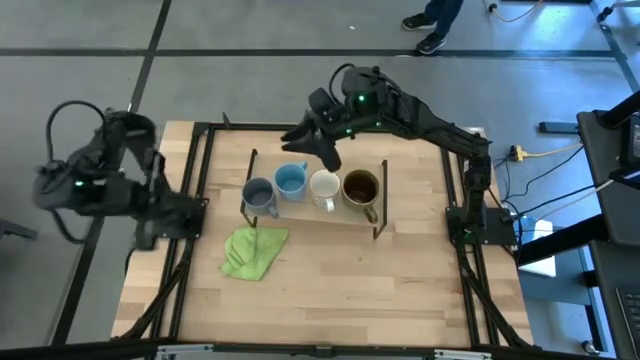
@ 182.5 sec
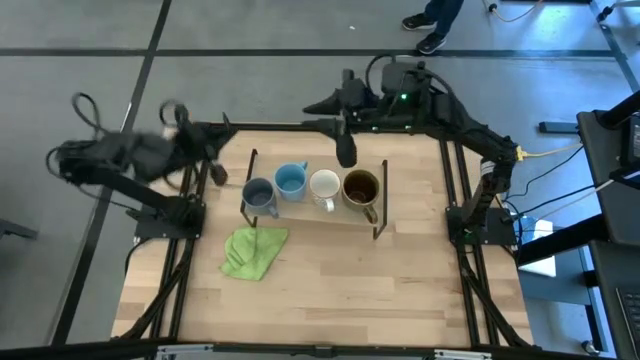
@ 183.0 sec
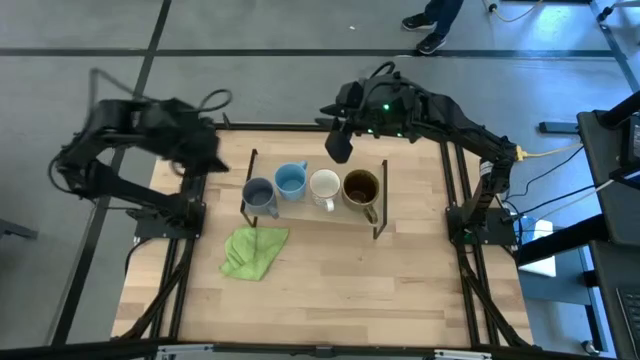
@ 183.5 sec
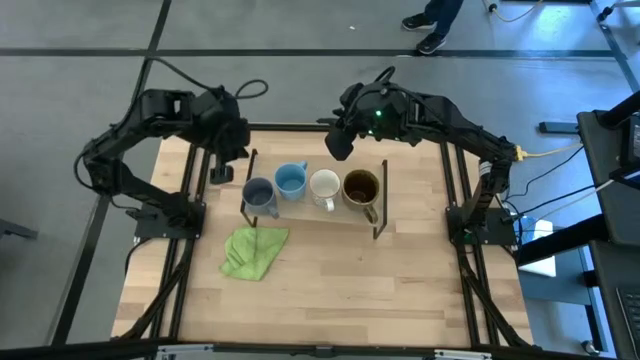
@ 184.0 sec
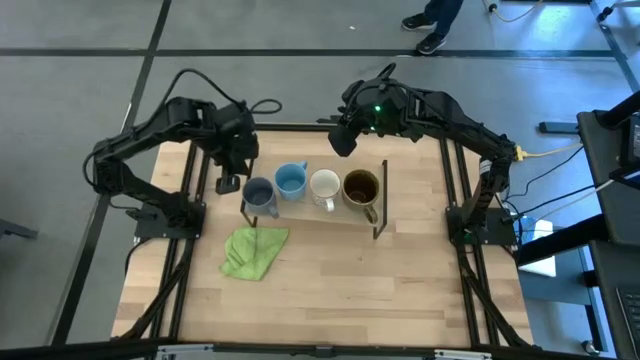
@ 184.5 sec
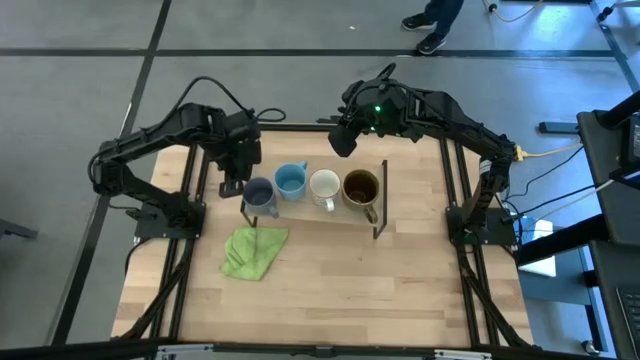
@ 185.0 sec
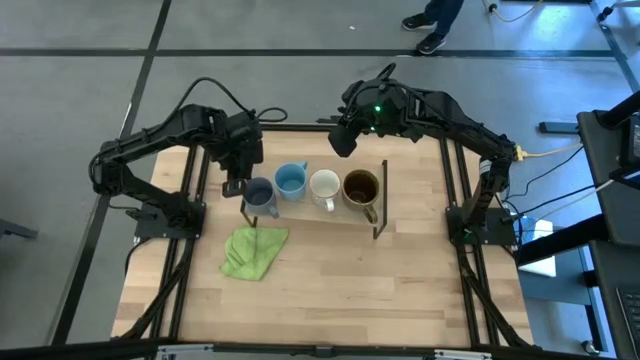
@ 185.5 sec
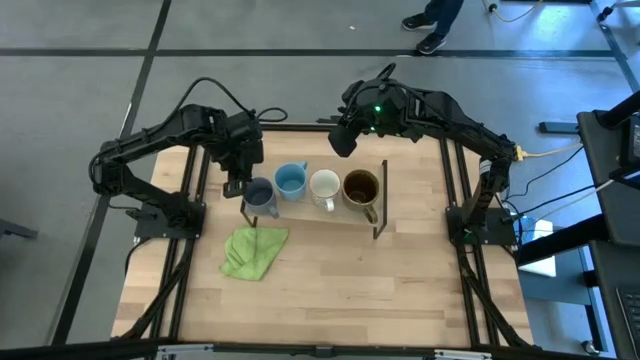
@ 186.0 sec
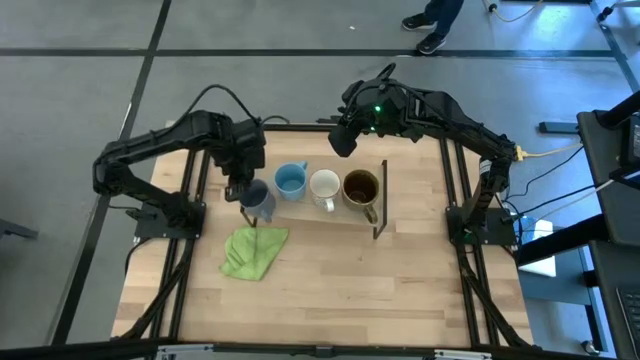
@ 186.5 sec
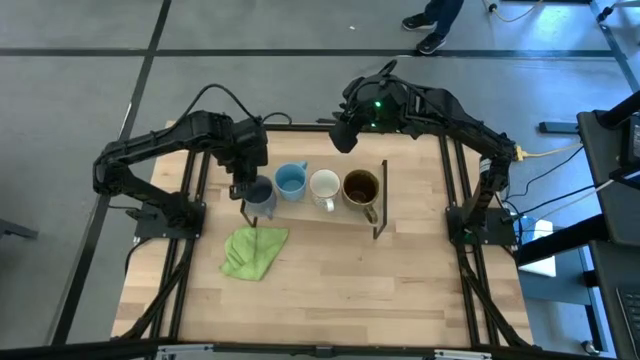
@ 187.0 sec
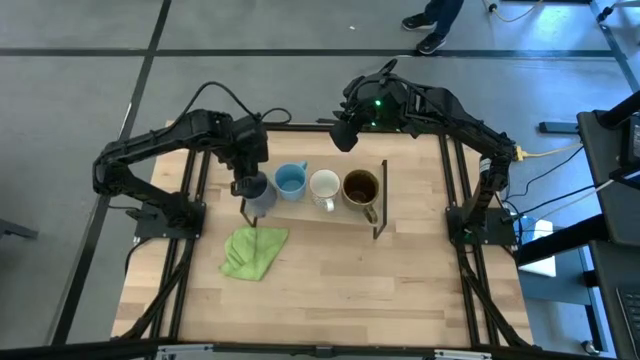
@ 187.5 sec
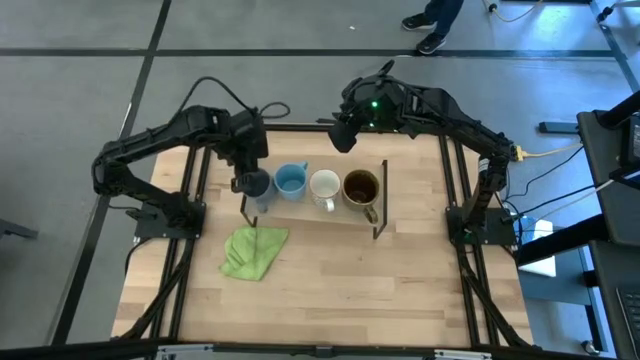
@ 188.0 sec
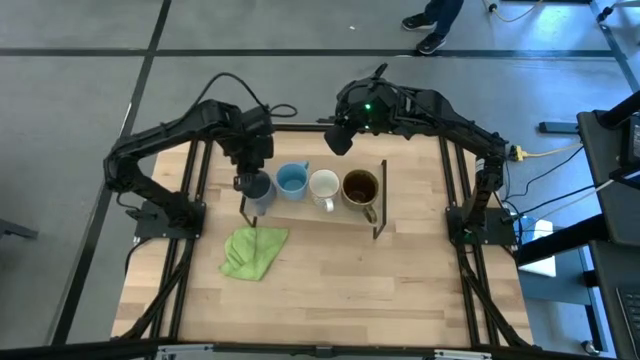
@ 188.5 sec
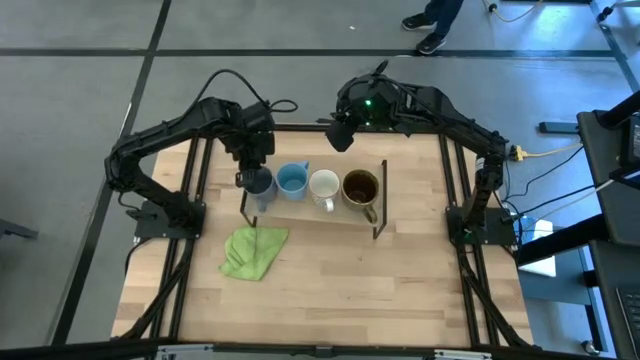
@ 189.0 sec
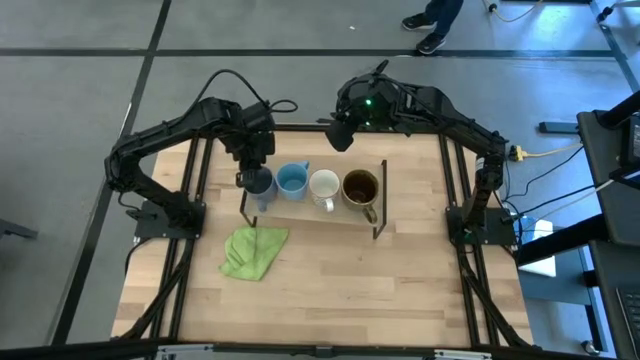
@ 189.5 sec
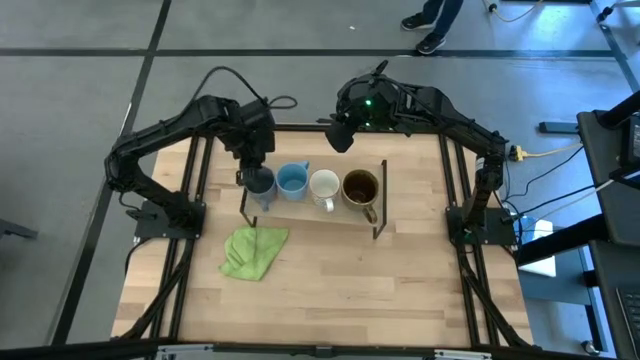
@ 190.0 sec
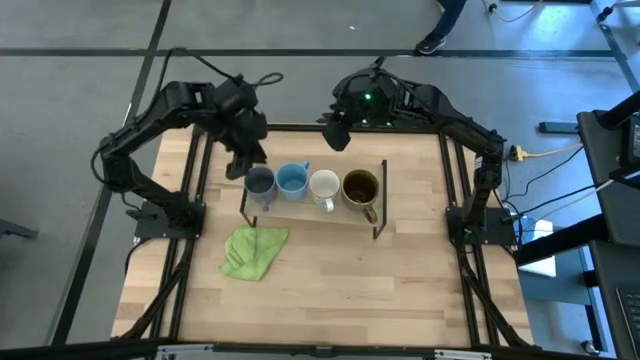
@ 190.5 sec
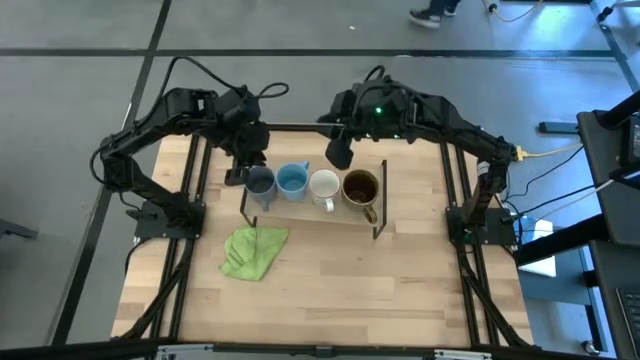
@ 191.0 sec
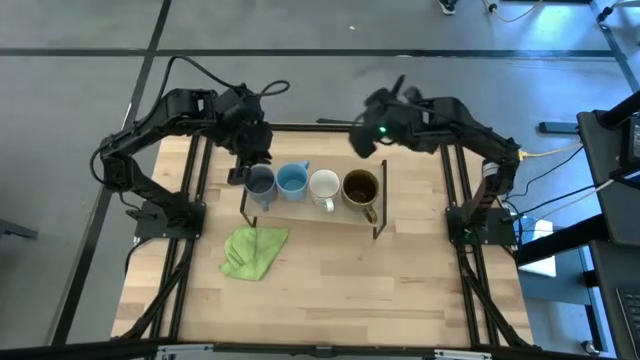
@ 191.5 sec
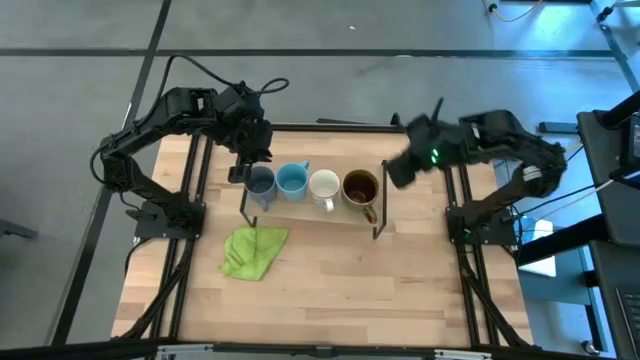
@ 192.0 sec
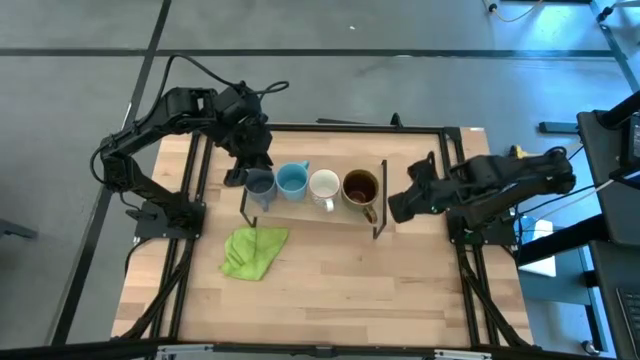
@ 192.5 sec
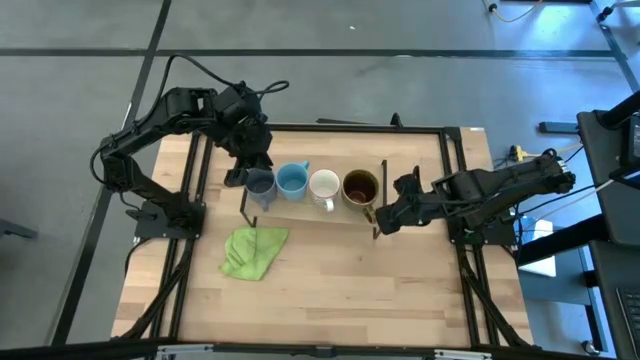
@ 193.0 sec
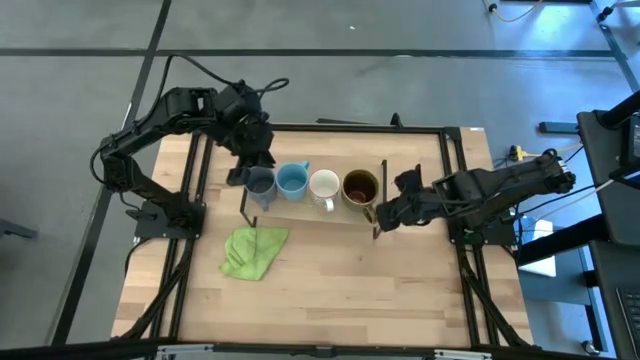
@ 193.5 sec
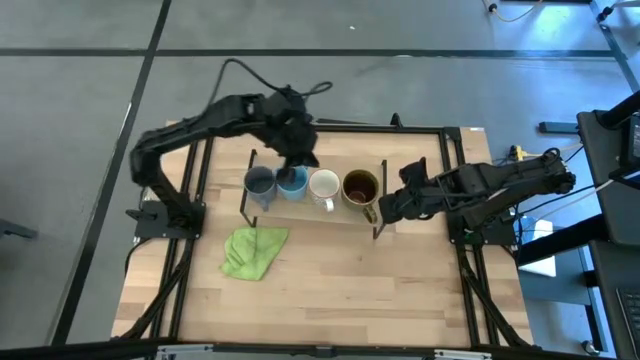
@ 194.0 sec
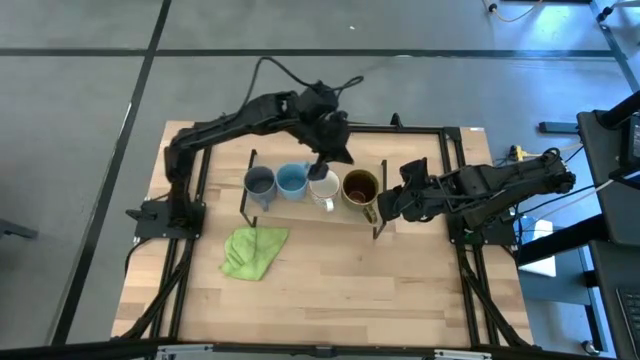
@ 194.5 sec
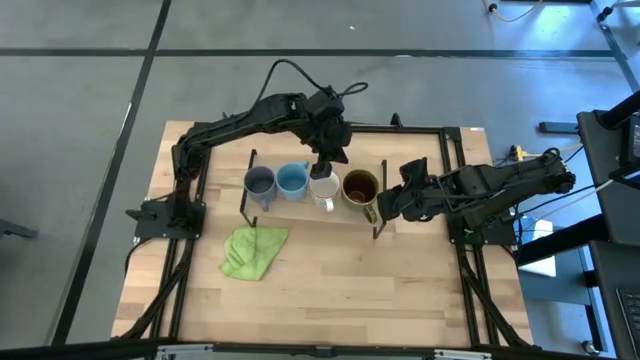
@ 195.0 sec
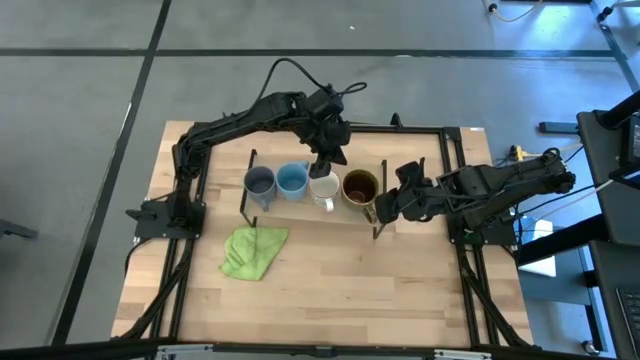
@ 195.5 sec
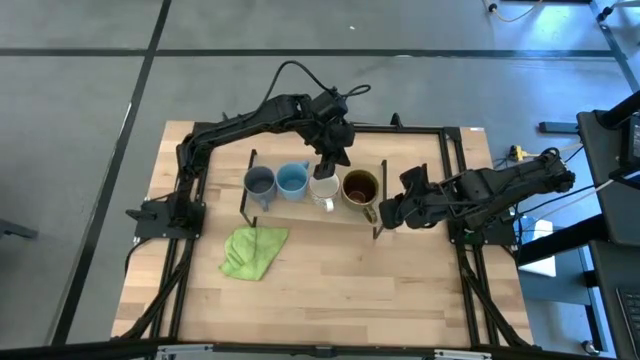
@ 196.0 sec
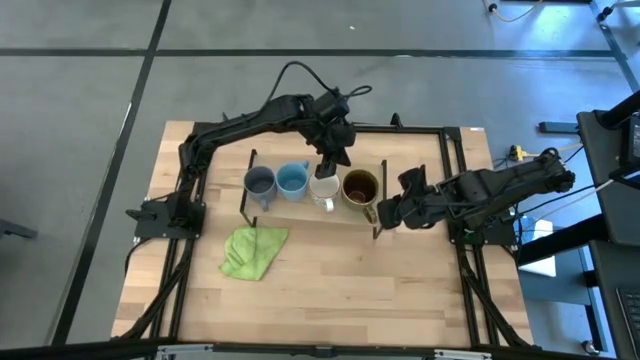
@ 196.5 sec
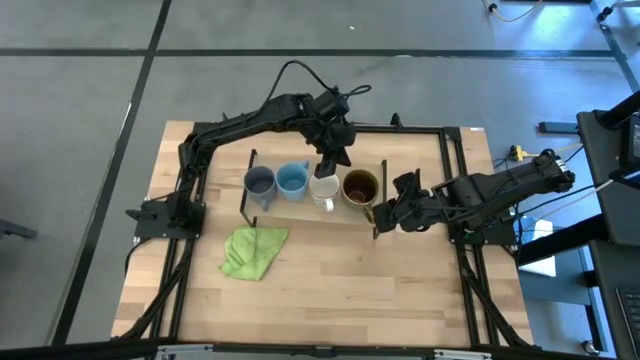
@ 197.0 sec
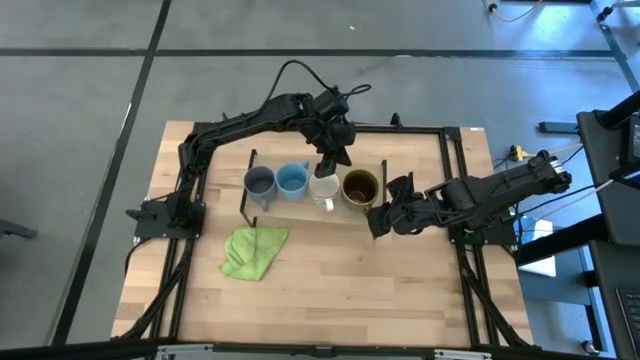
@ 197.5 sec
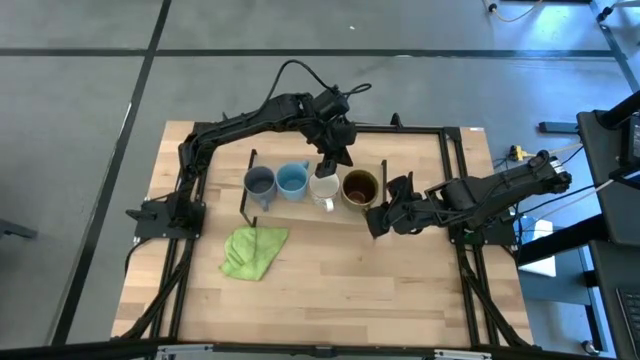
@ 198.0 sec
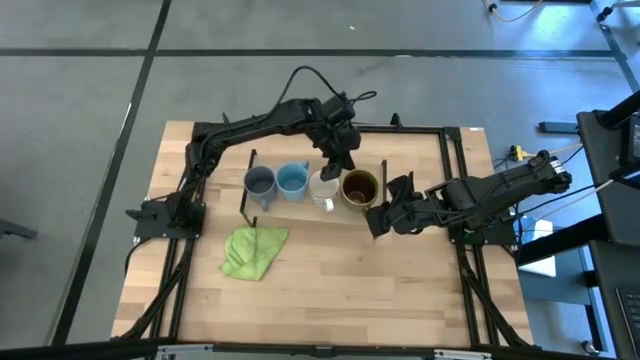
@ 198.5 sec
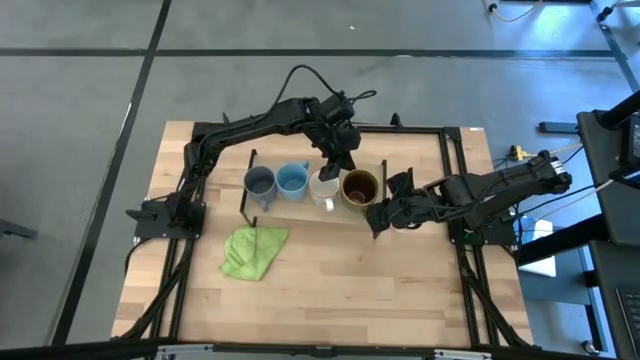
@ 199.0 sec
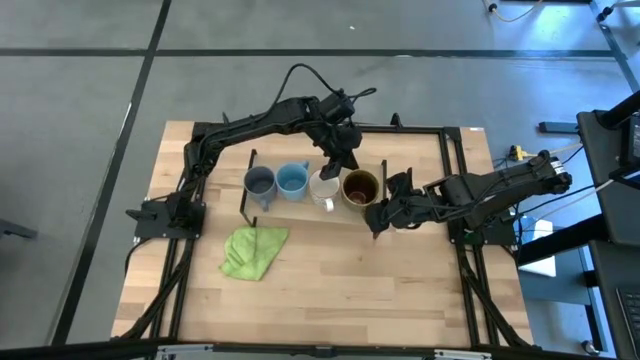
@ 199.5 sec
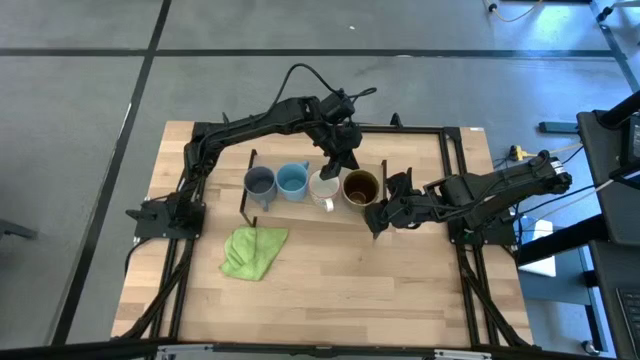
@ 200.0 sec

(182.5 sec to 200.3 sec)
Task: Stack small to large cups/mugs on shelf
Adjust the mugs on the shelf
